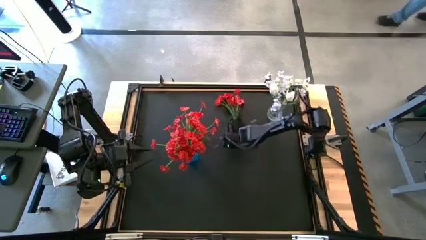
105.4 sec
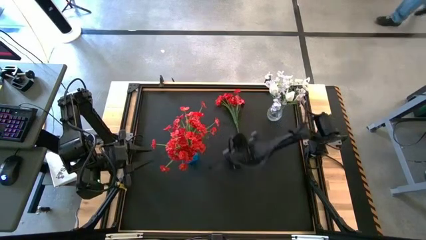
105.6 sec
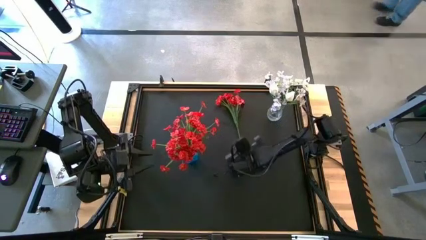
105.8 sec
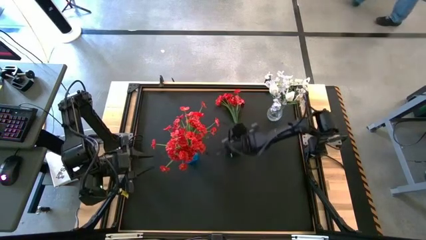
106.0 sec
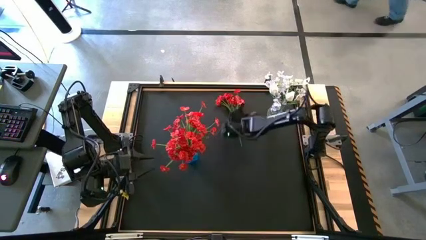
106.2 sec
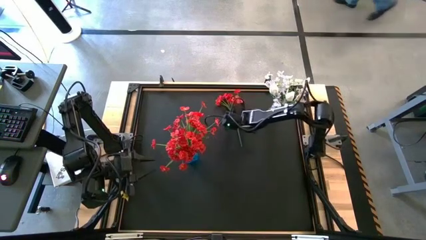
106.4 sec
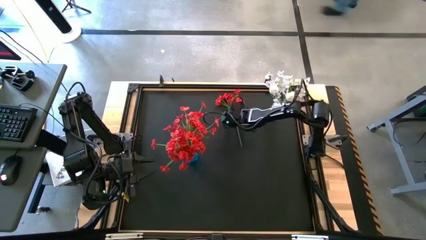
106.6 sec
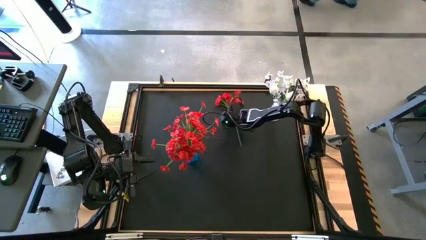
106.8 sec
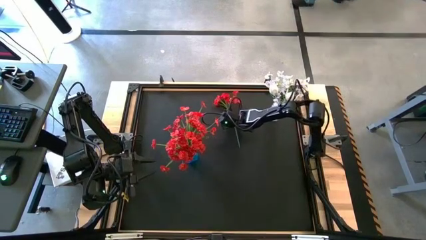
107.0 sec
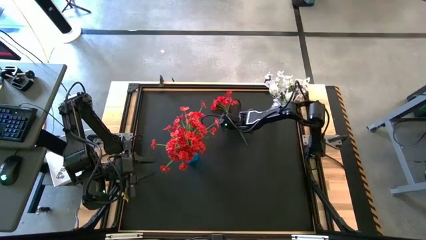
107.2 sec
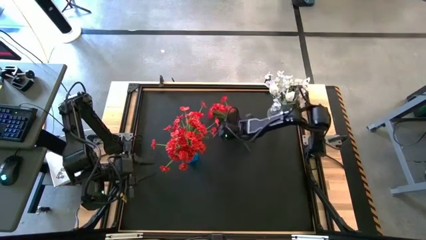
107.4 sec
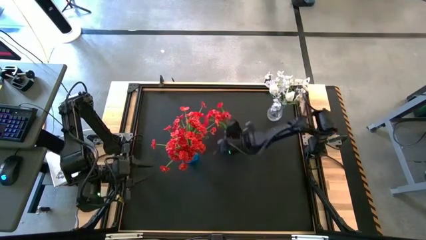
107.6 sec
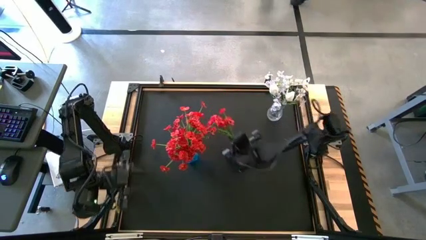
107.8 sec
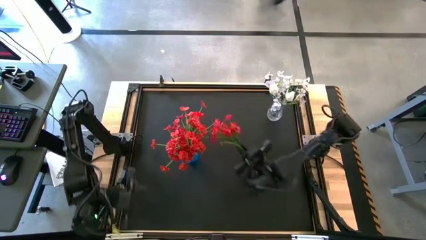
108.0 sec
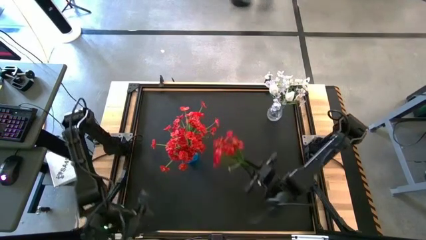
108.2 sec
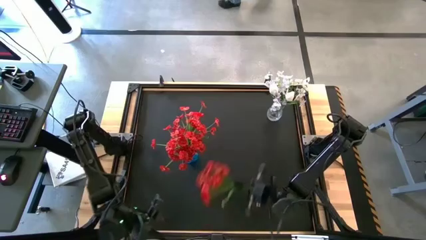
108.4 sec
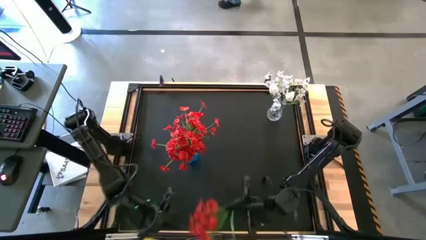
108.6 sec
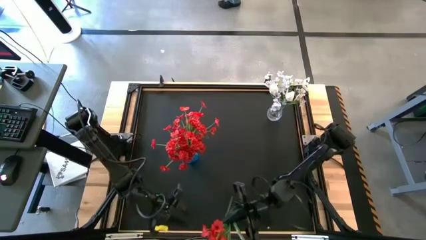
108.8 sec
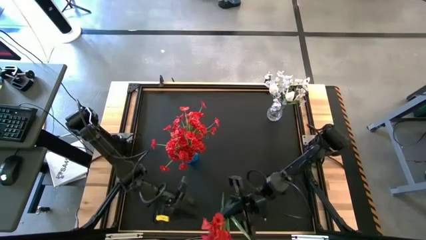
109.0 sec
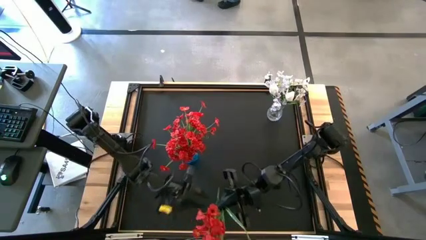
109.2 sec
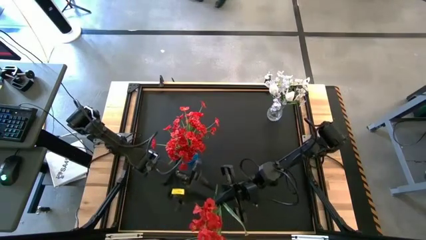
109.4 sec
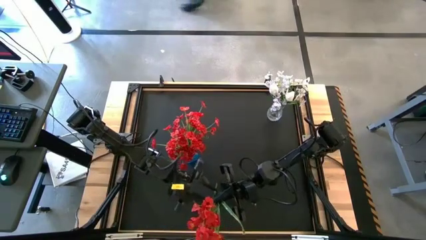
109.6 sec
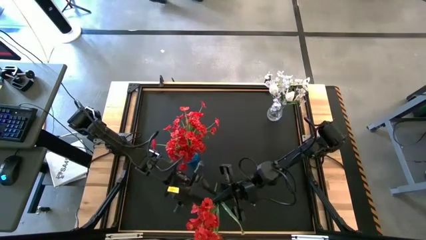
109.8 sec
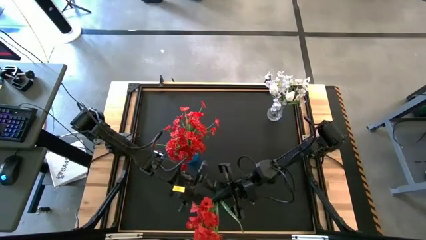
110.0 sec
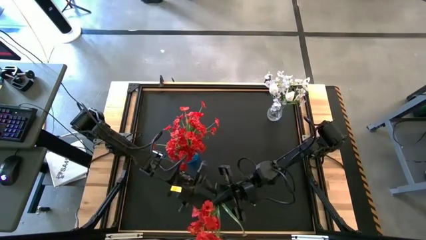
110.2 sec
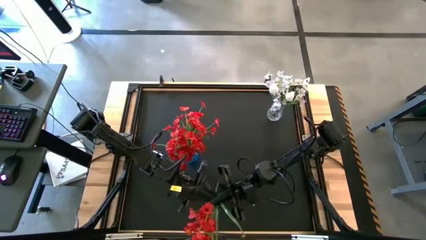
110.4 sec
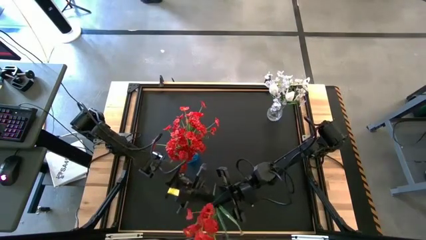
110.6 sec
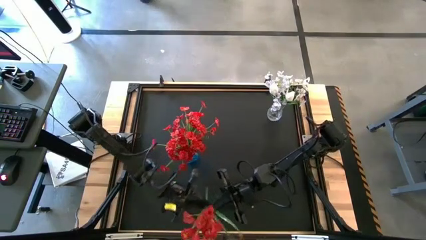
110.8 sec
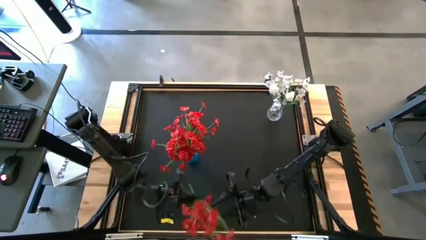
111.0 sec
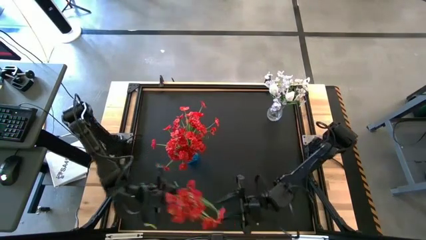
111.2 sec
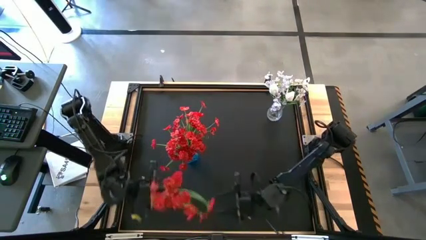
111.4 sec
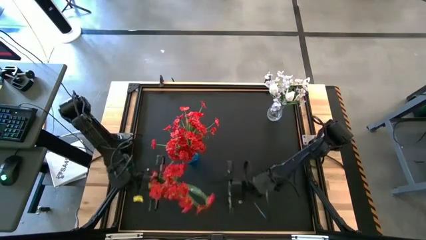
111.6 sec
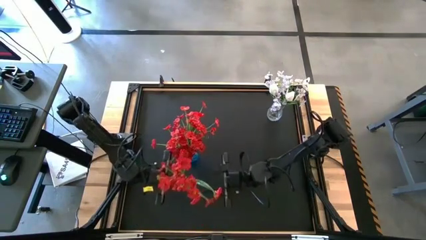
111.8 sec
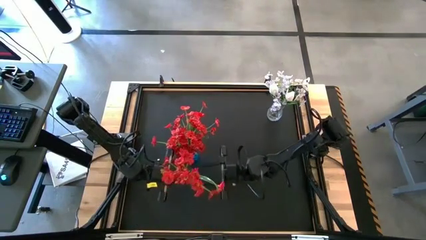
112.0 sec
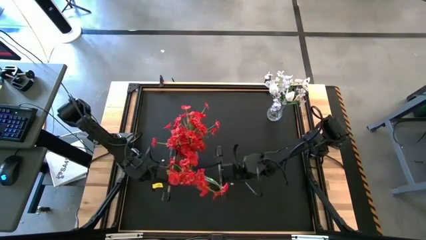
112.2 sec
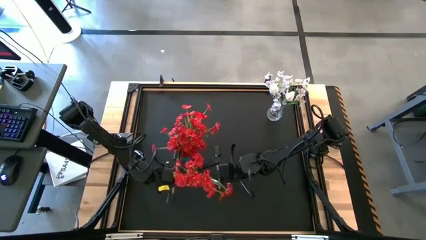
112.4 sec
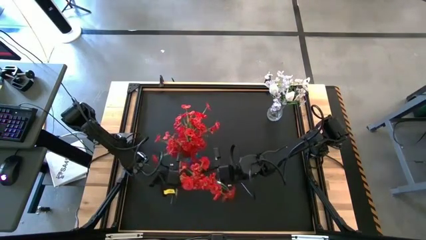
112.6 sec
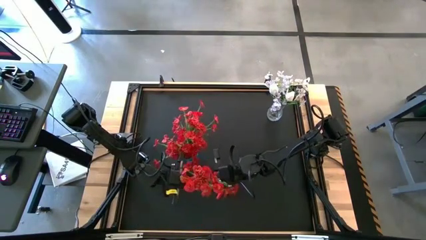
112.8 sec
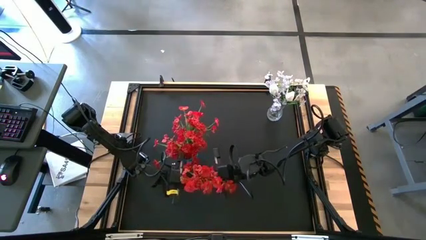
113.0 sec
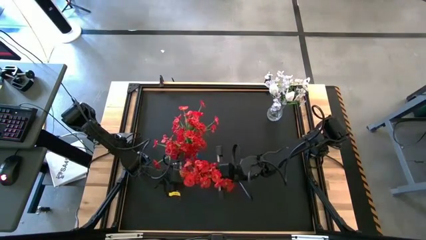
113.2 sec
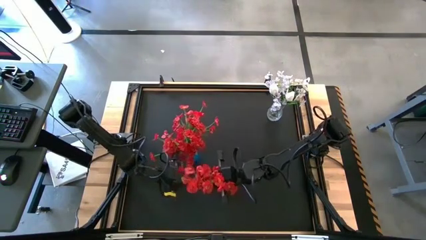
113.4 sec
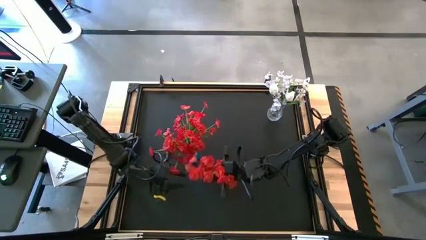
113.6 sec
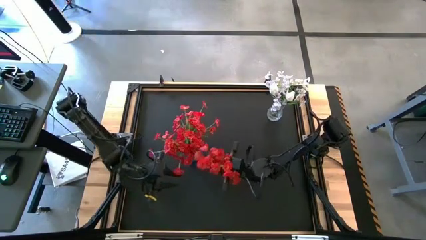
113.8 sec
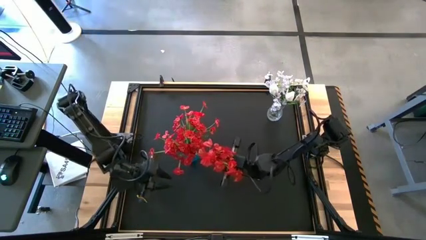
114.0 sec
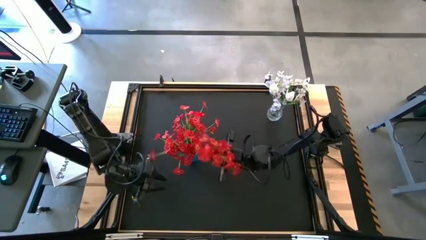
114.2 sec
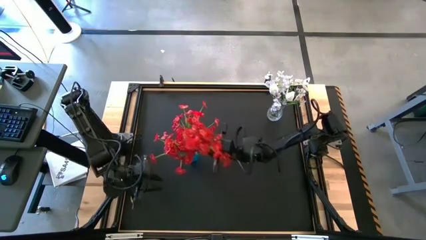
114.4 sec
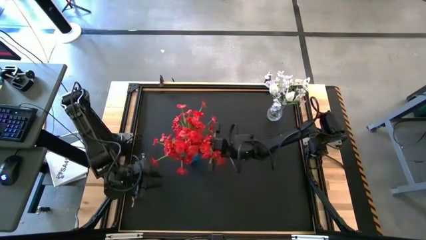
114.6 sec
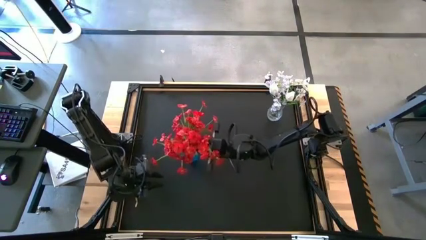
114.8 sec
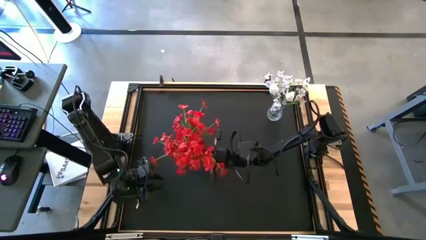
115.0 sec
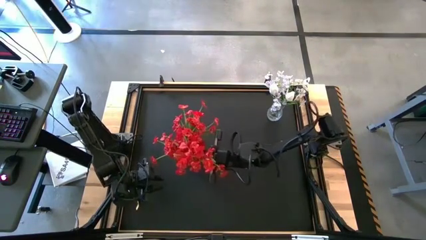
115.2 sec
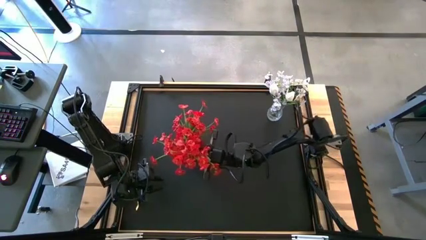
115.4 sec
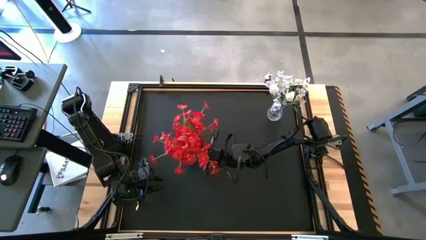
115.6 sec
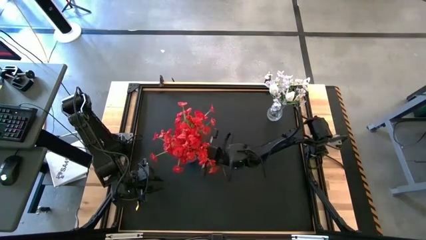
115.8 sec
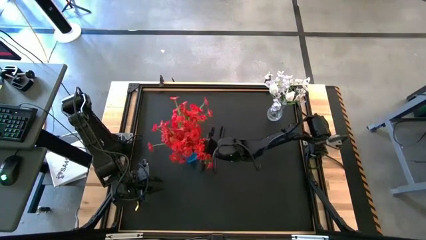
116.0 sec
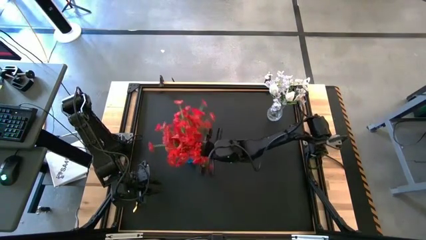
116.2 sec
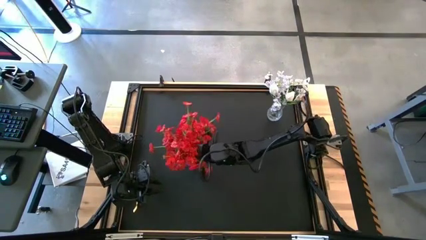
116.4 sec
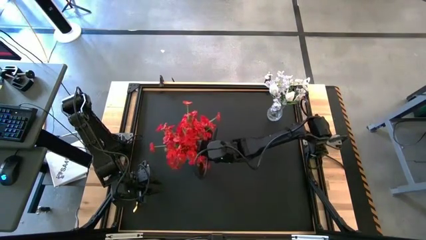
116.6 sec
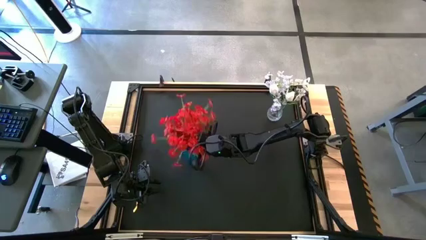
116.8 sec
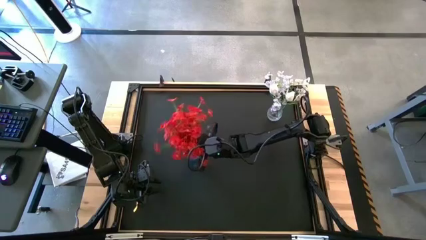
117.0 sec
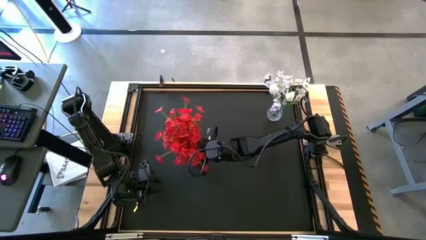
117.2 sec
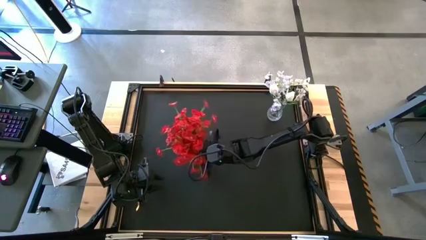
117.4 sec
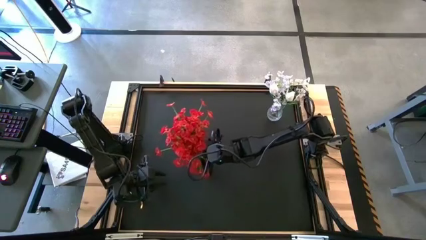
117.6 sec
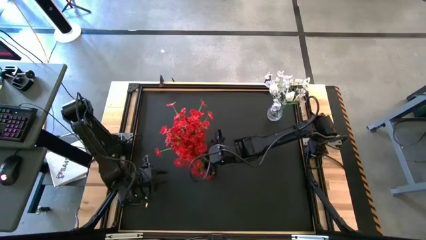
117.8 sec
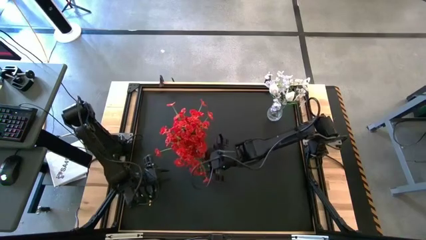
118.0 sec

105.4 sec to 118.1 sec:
Task: Sort flowers into vase by color
Put the red flowers into the blue vase

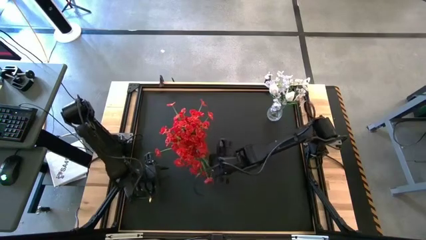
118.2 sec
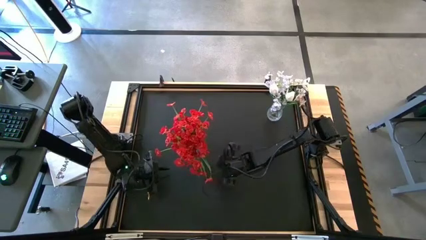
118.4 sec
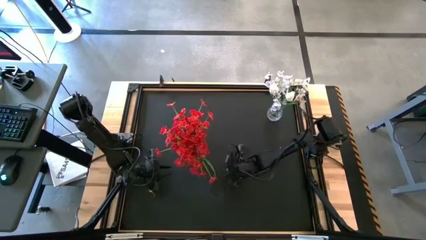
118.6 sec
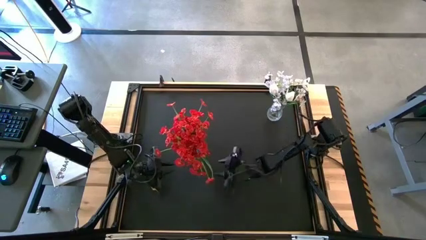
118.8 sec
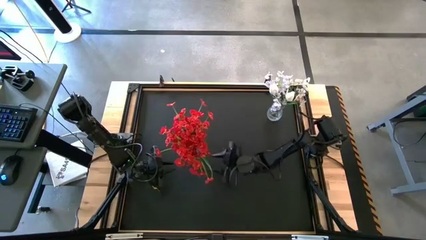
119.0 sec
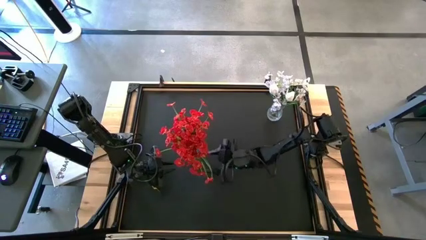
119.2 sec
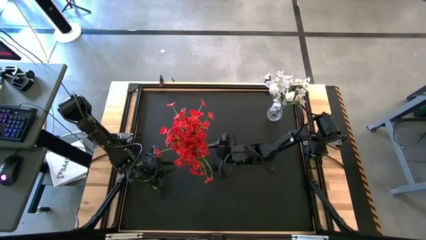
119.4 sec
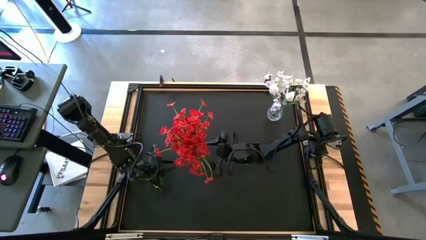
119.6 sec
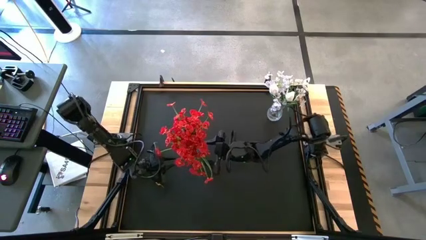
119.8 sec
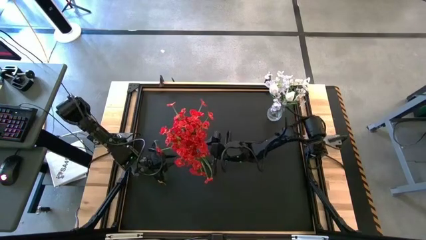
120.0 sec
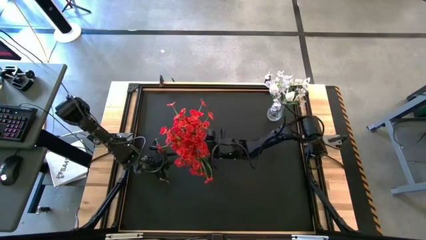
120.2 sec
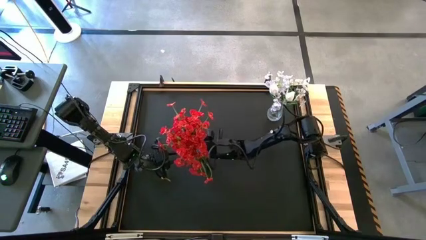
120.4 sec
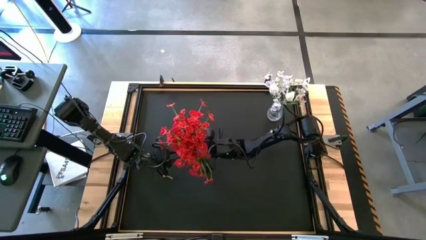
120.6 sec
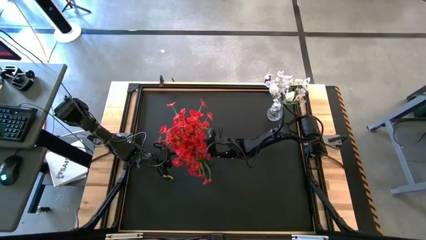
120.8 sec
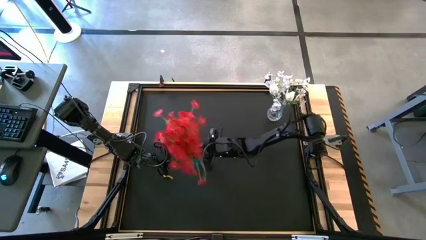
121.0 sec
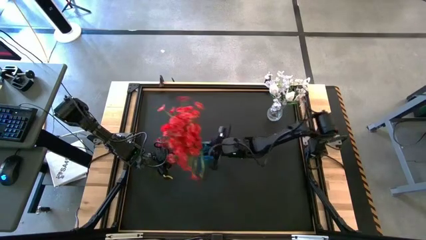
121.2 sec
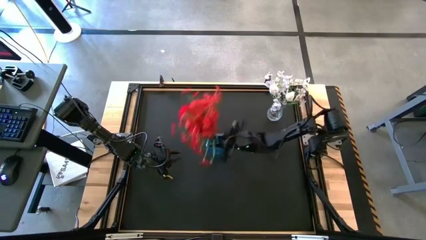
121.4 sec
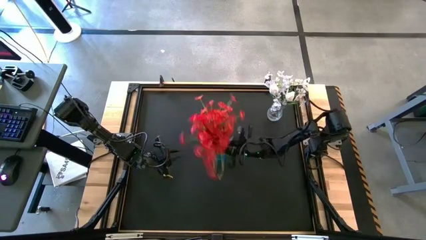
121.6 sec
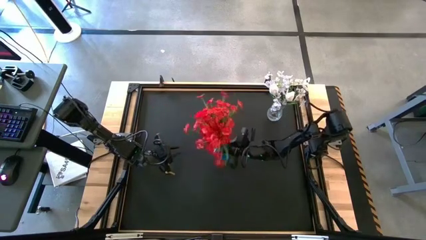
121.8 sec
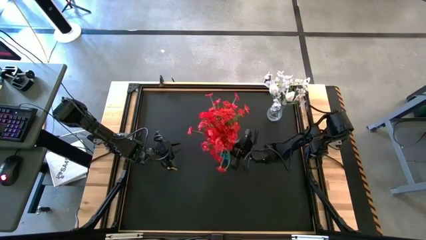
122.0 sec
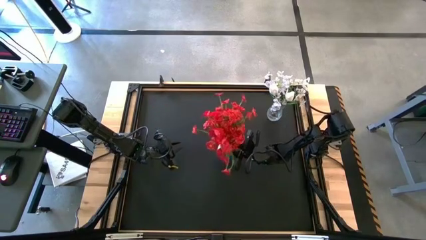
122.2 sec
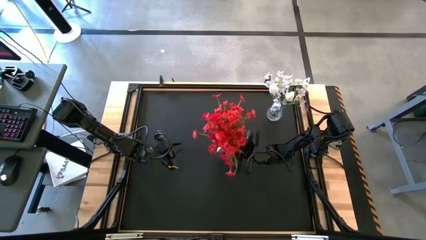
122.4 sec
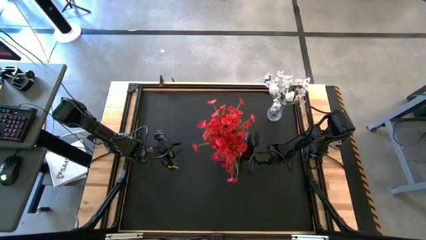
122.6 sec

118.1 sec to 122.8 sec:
Move the blue vase to the center of the table
